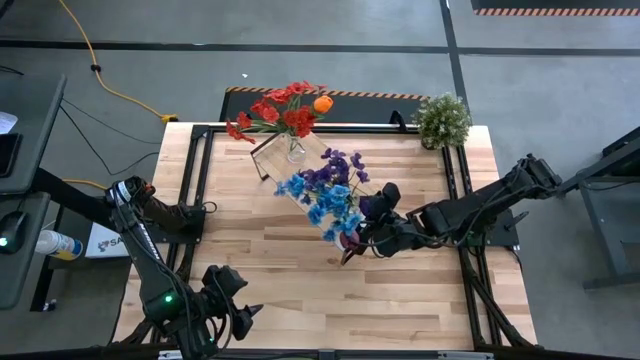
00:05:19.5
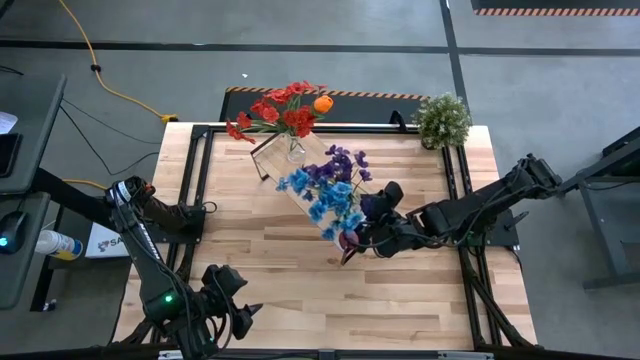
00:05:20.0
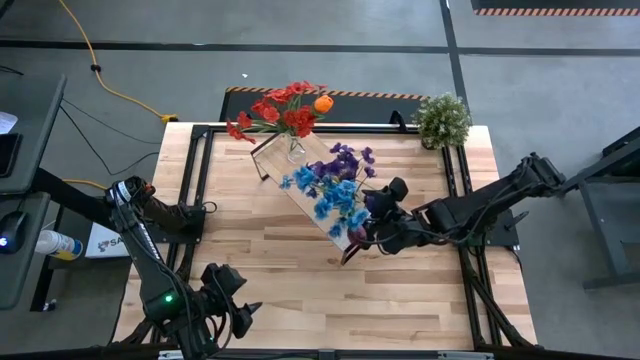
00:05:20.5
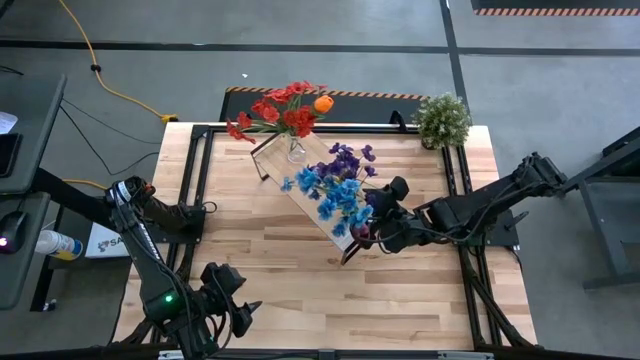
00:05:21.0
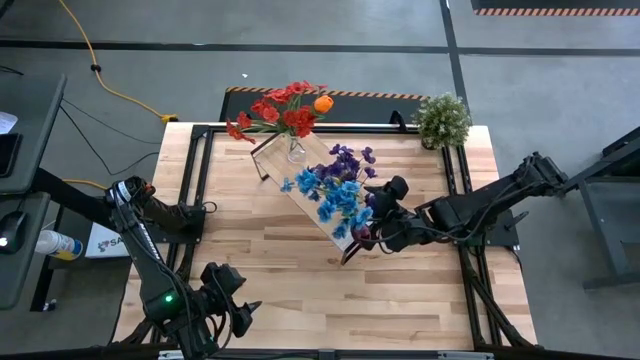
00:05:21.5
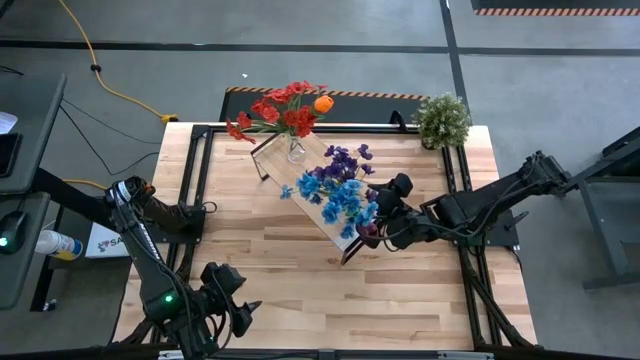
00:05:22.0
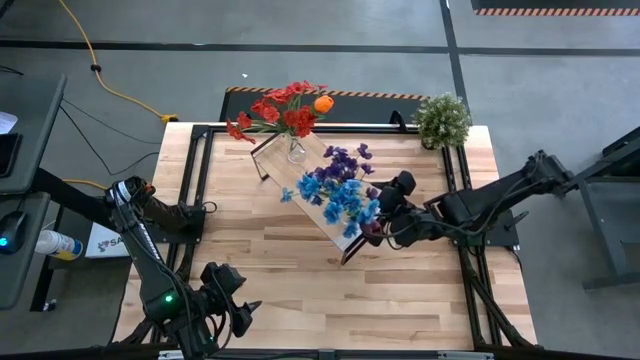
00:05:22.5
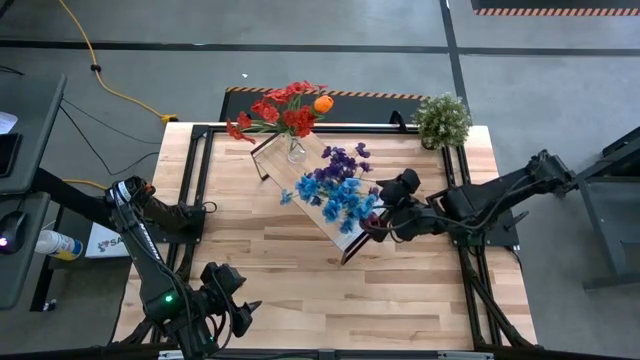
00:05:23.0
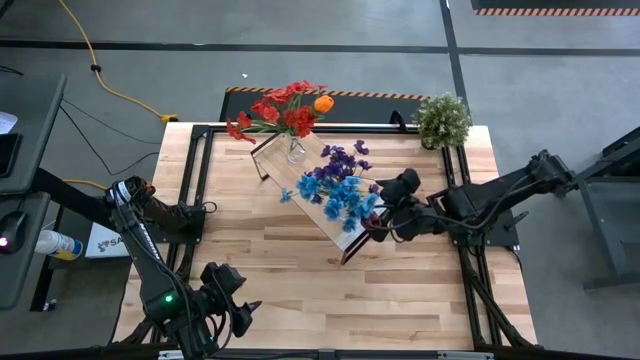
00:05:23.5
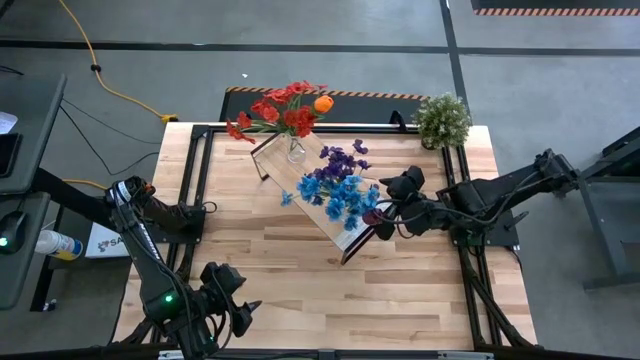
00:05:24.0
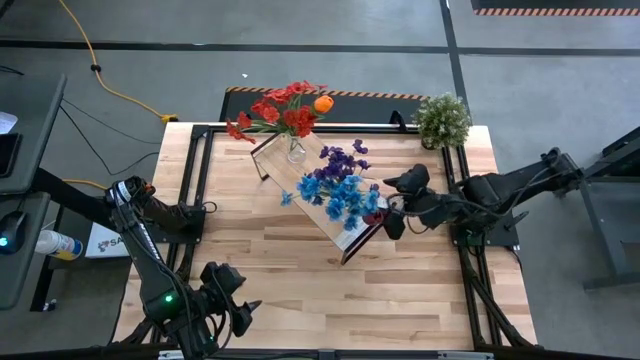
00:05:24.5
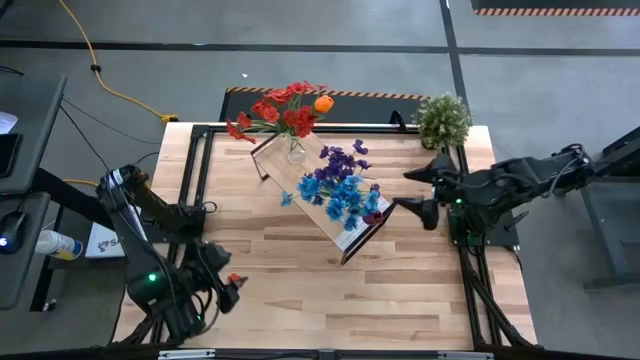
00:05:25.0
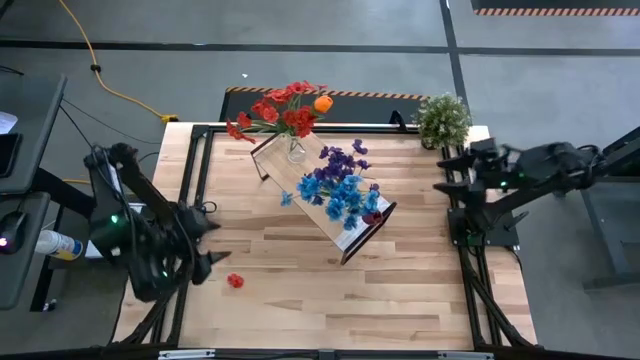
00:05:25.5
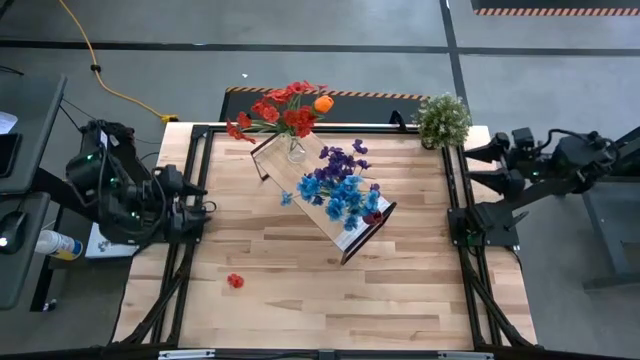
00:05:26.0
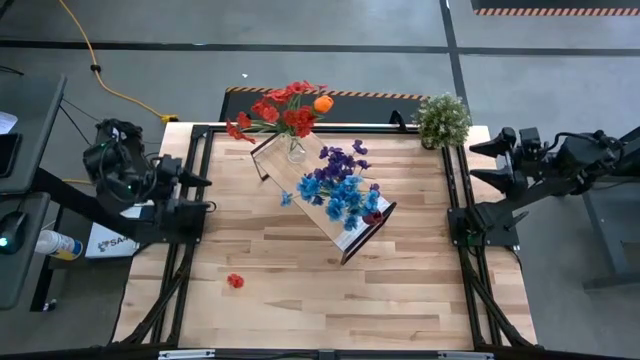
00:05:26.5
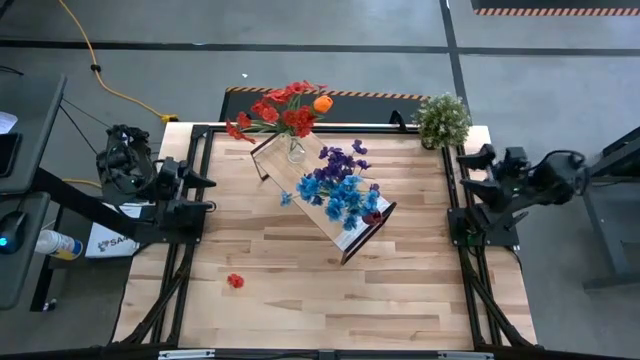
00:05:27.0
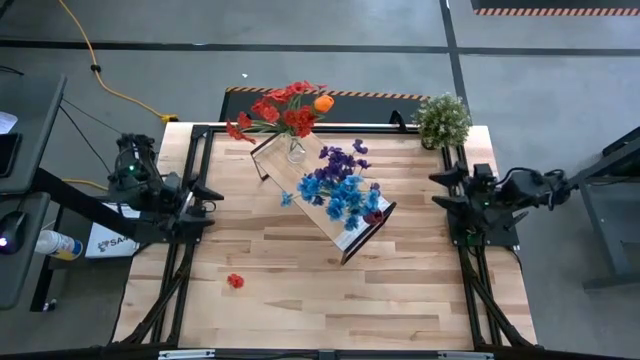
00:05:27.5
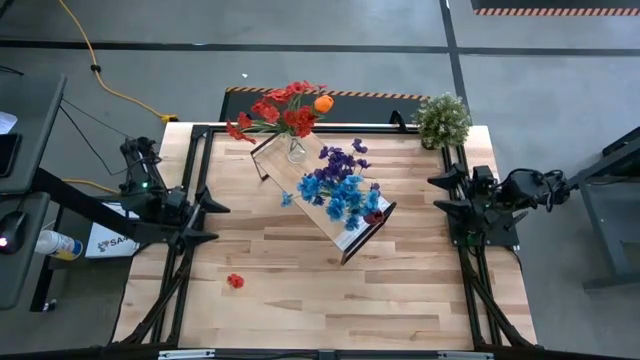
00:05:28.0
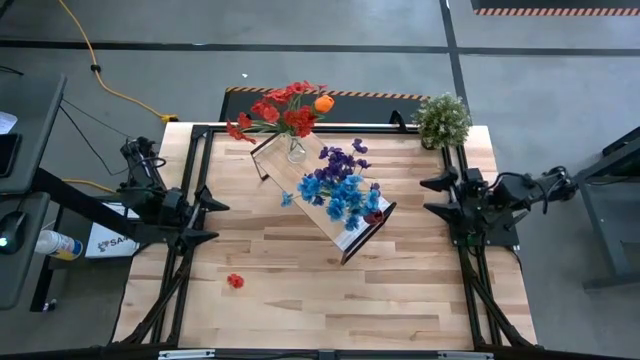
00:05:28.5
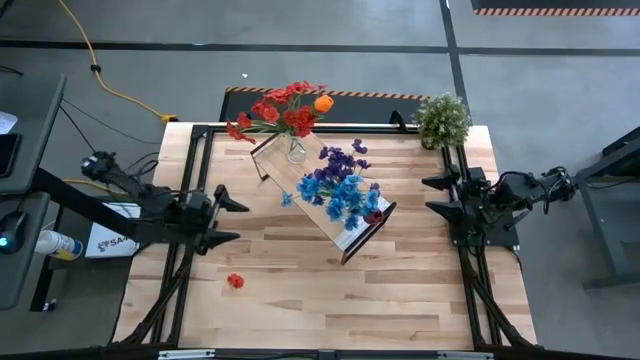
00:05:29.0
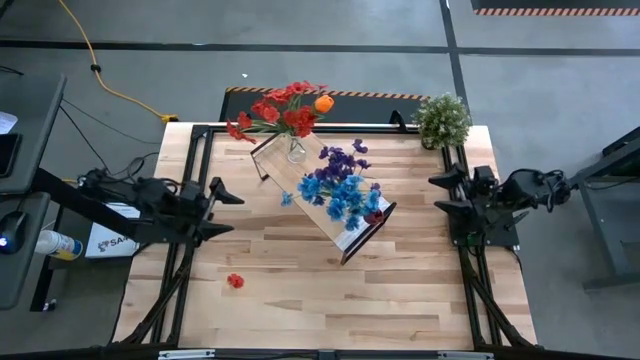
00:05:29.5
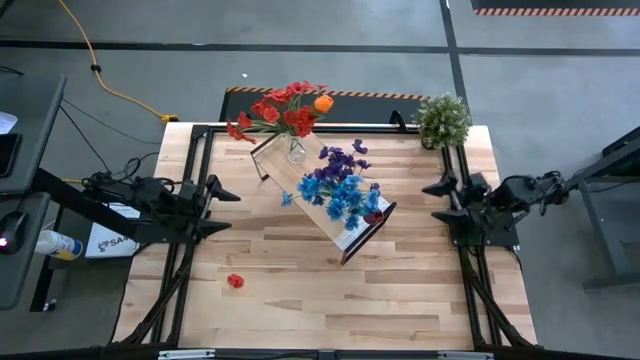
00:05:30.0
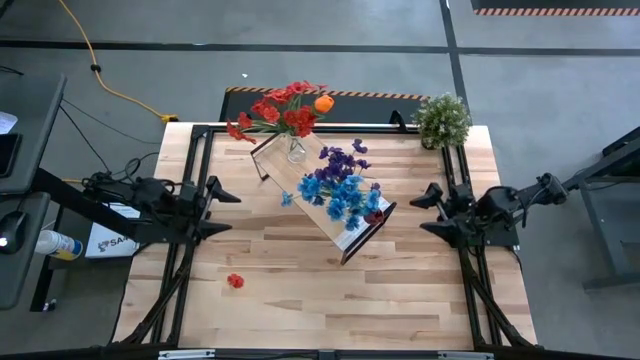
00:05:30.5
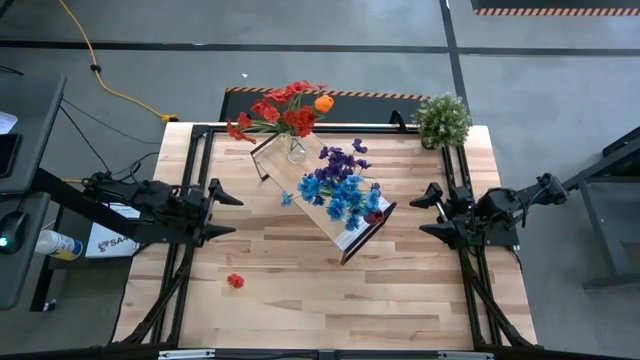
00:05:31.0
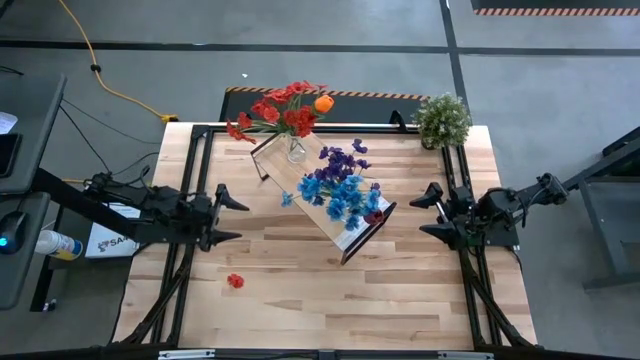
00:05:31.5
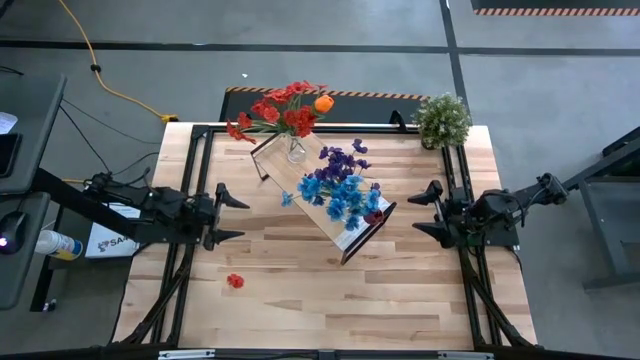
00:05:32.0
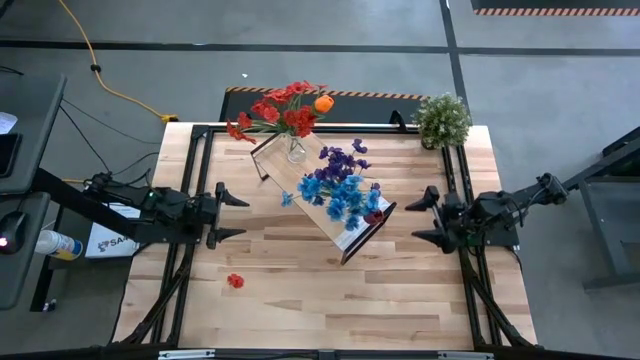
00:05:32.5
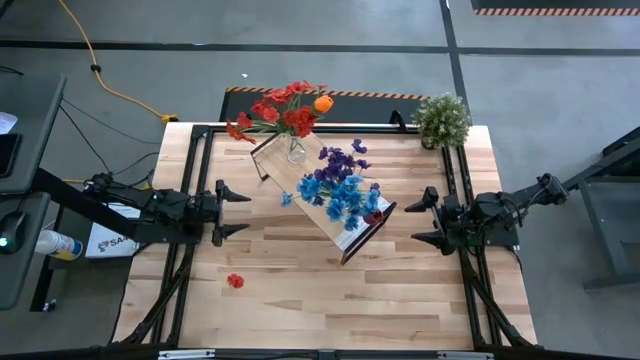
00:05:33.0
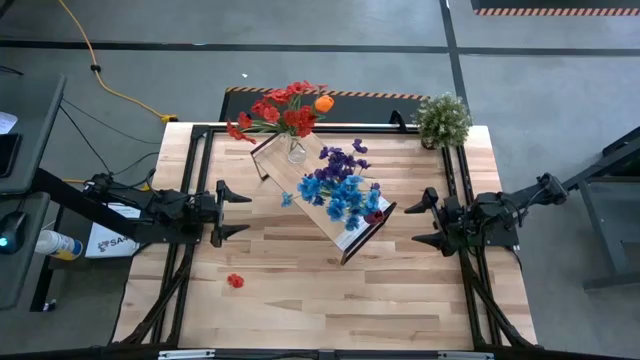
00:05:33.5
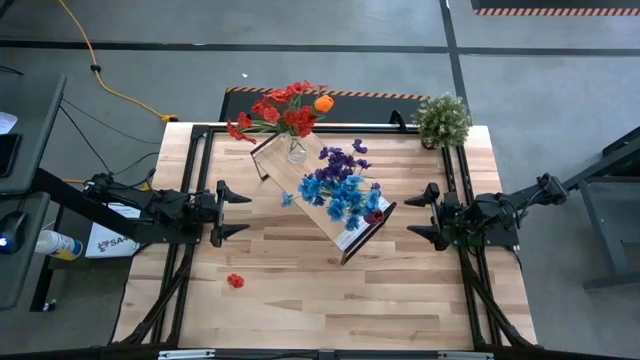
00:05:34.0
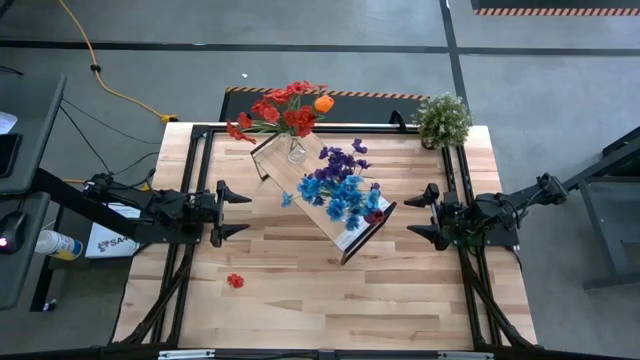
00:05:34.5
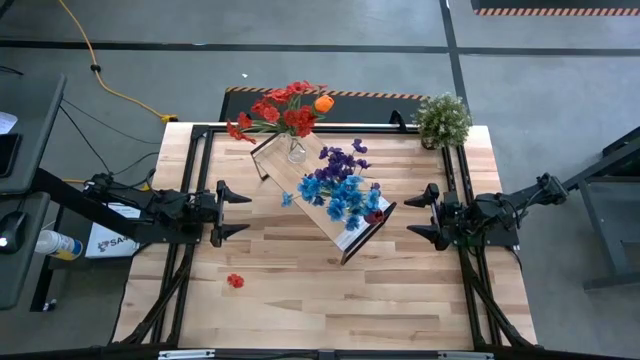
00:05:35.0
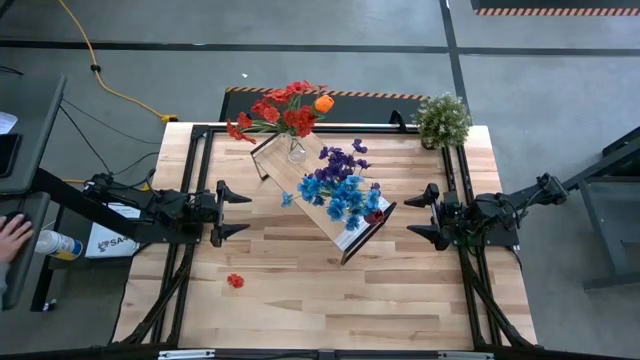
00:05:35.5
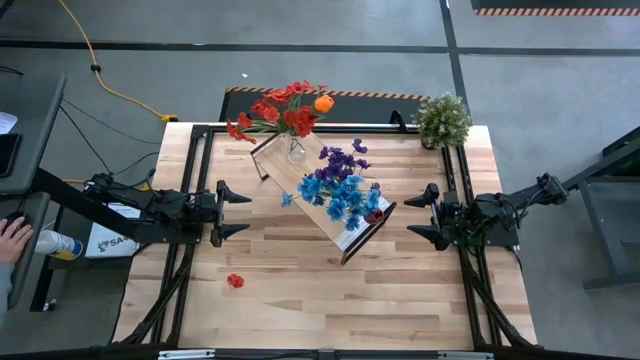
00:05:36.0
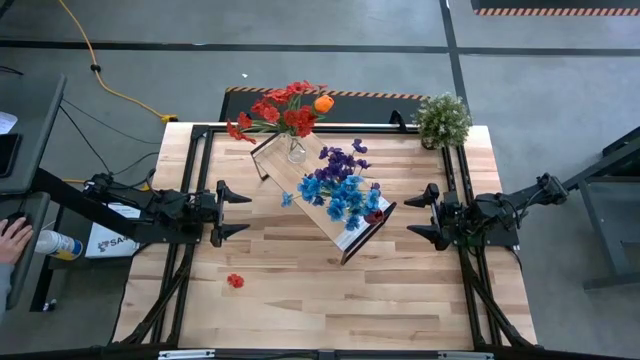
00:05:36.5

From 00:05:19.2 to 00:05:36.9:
Task: Pick and place flowers into a vace then onto a shelf
Return to Home Position

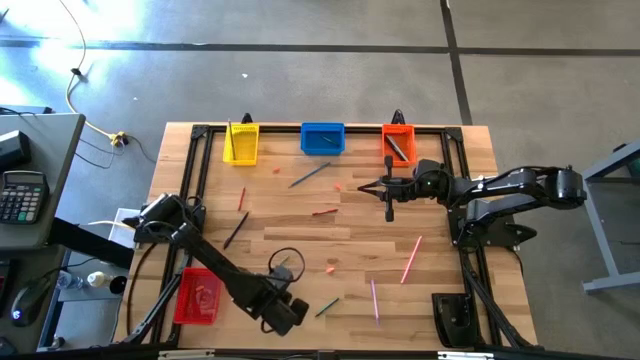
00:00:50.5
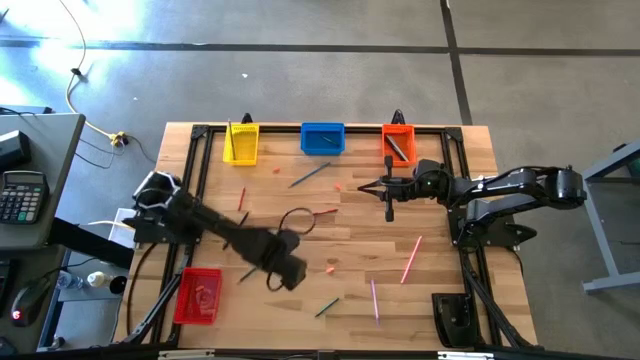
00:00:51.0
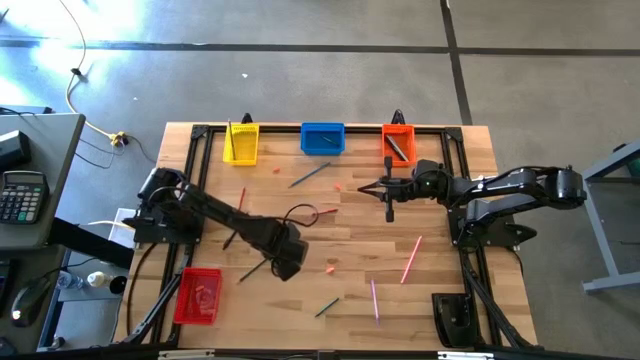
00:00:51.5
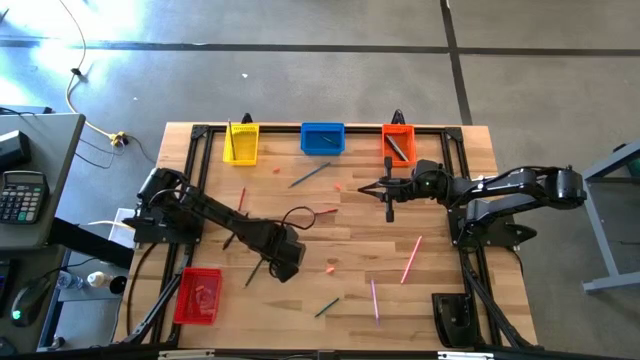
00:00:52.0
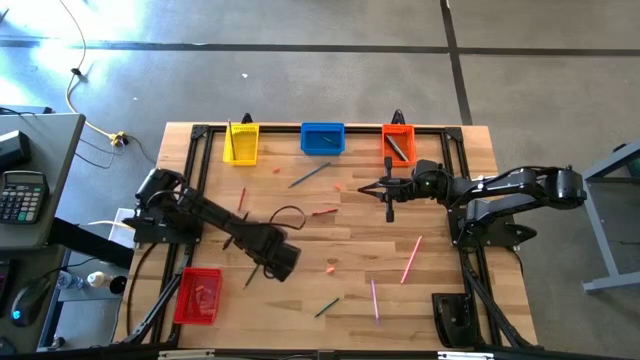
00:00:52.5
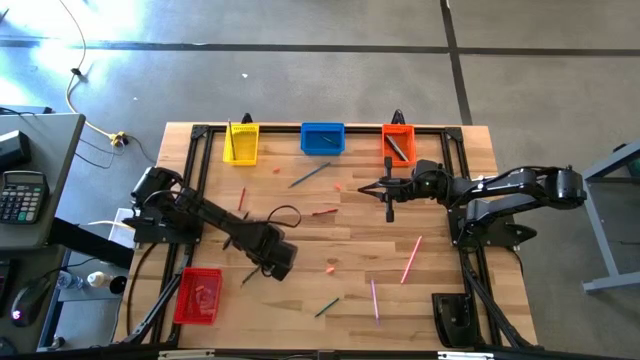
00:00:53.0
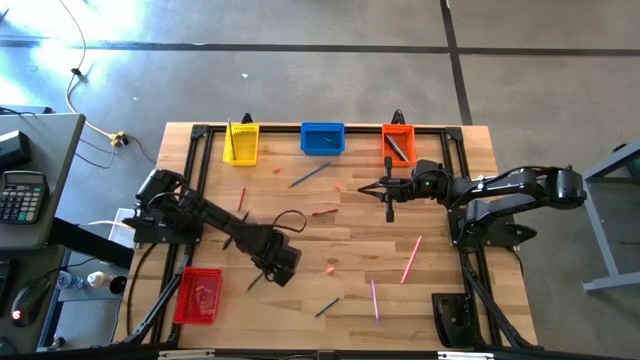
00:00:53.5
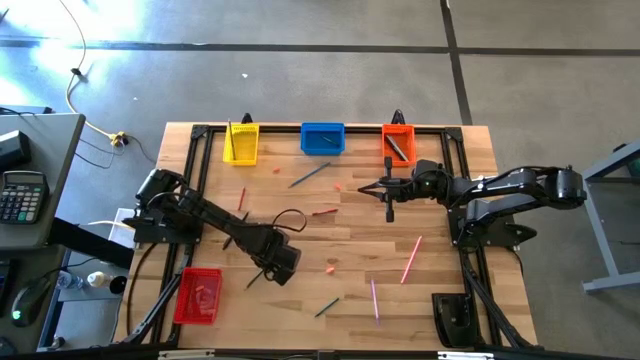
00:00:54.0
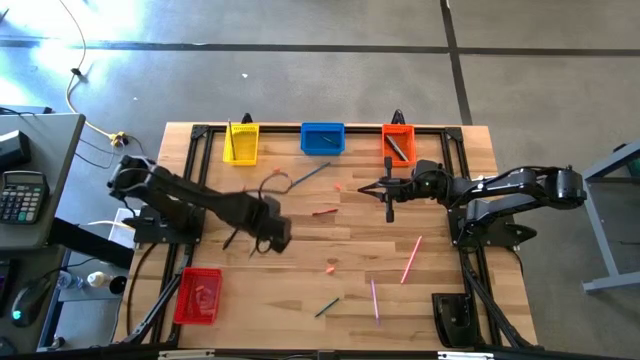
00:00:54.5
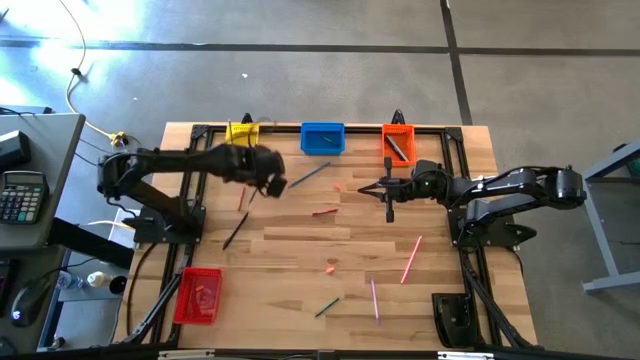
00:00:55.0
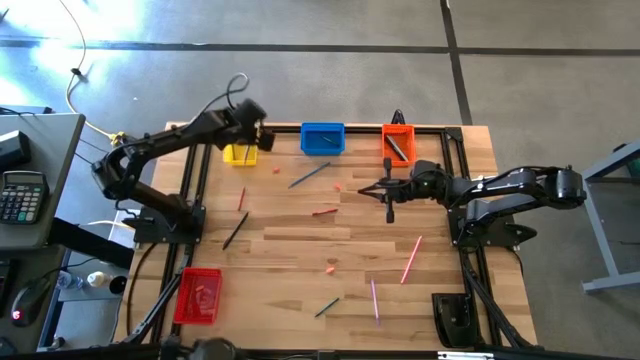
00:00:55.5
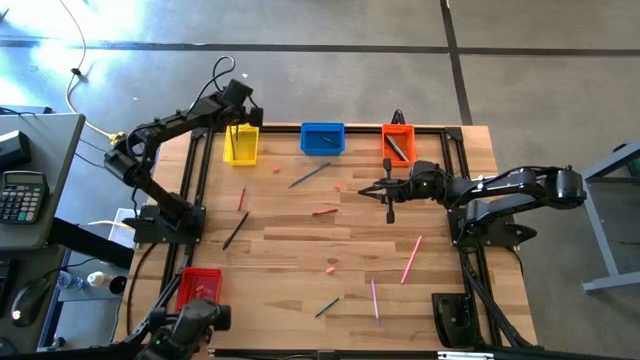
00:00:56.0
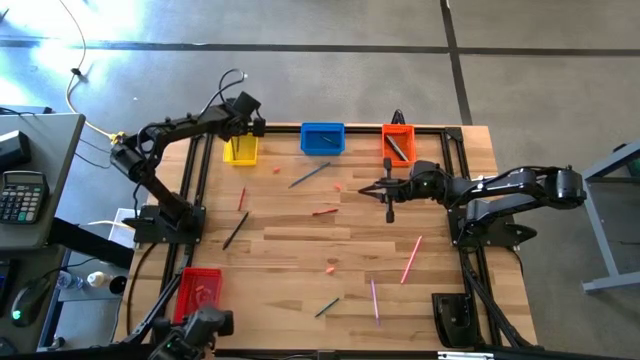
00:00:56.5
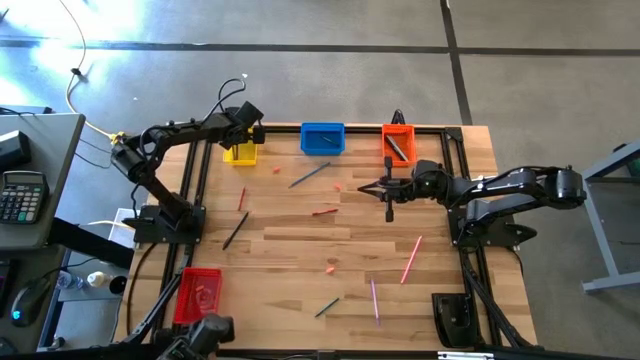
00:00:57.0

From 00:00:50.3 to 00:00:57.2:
Task: Sort crayons/erasers/pens/pencils in bins
Put the green colored pencil into the yellow bin
